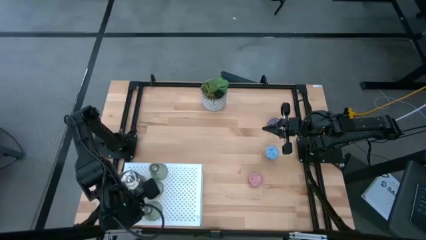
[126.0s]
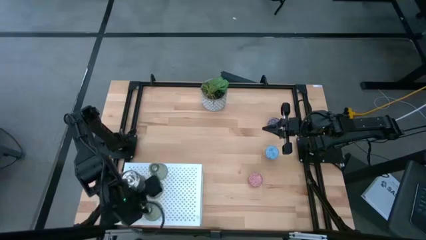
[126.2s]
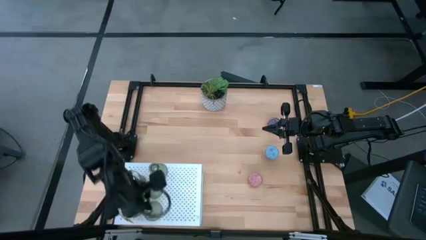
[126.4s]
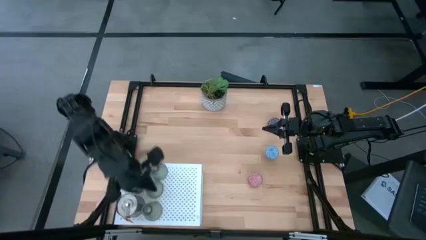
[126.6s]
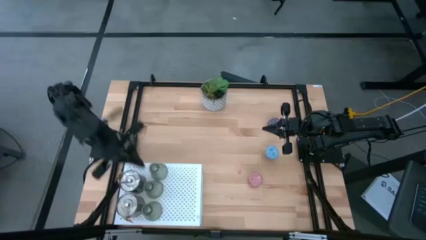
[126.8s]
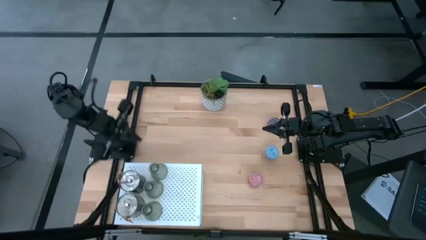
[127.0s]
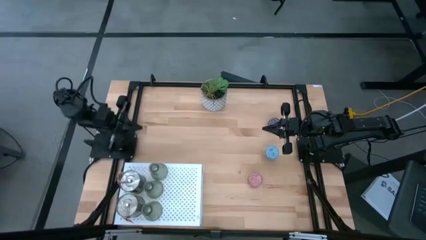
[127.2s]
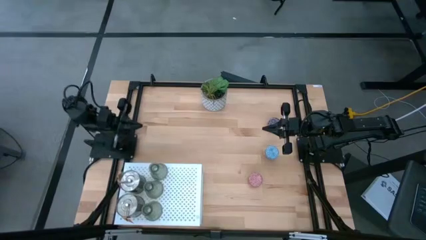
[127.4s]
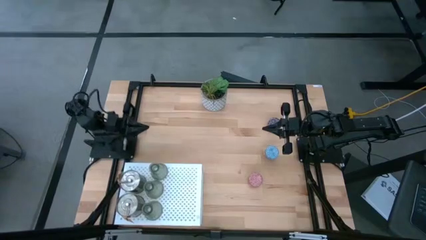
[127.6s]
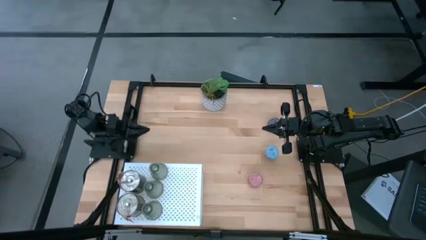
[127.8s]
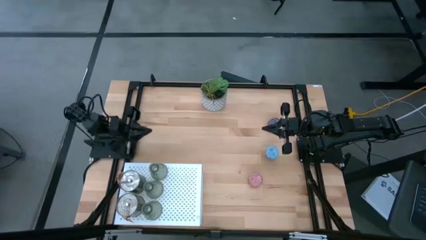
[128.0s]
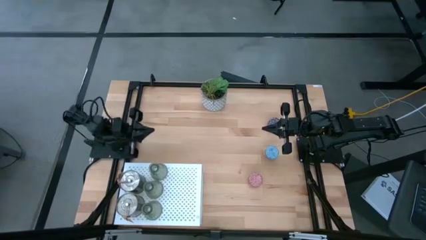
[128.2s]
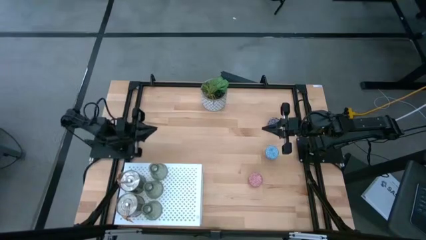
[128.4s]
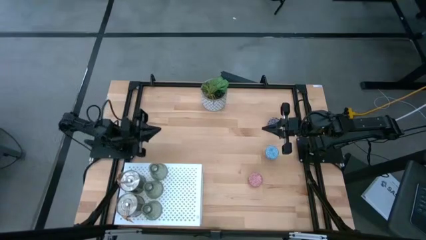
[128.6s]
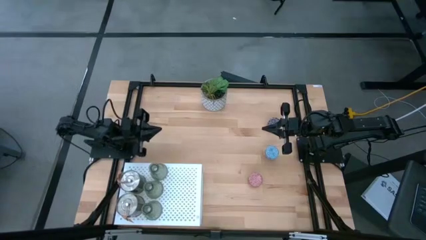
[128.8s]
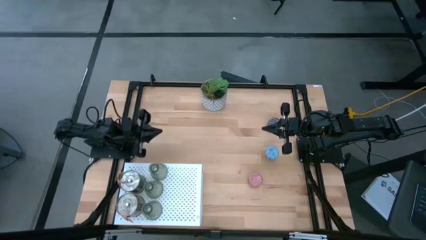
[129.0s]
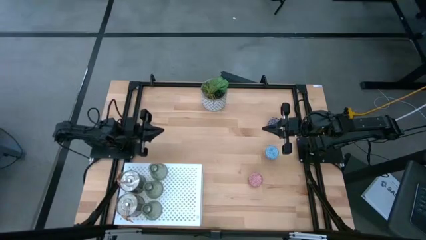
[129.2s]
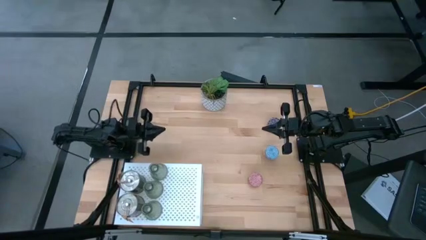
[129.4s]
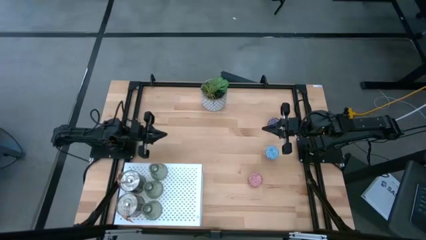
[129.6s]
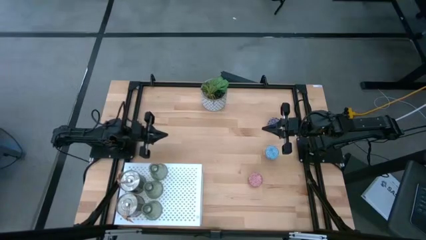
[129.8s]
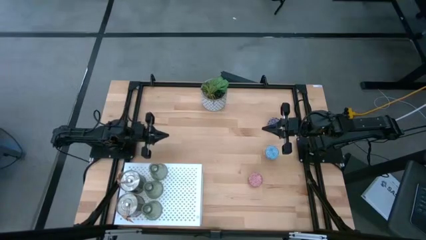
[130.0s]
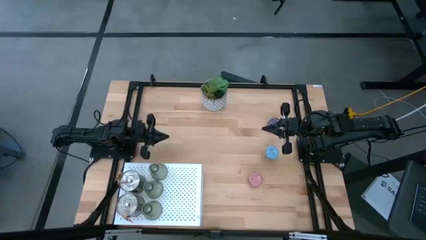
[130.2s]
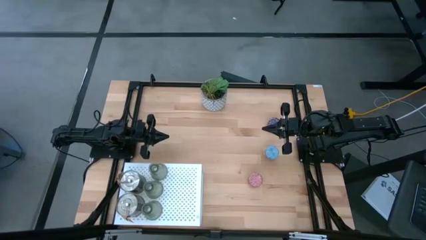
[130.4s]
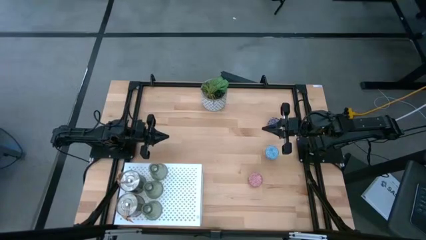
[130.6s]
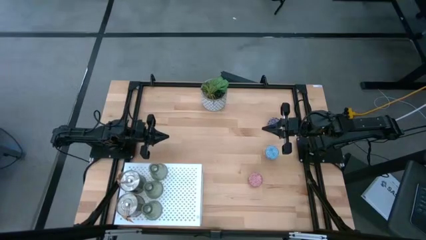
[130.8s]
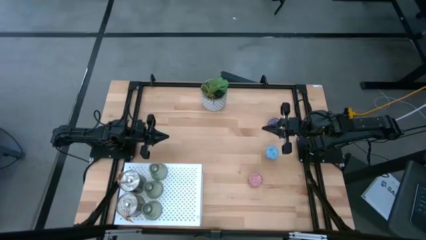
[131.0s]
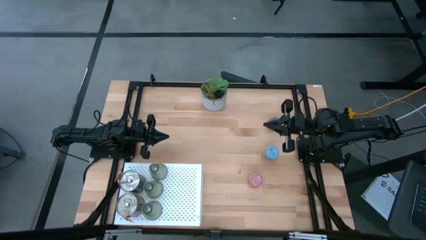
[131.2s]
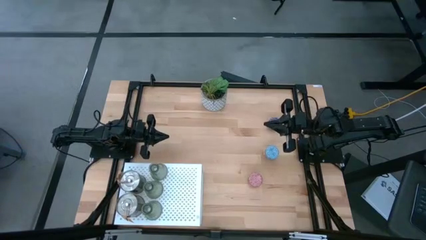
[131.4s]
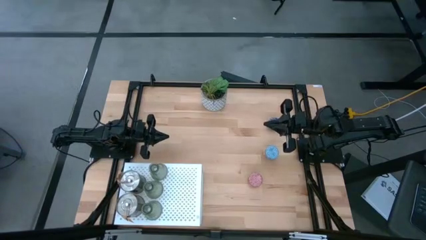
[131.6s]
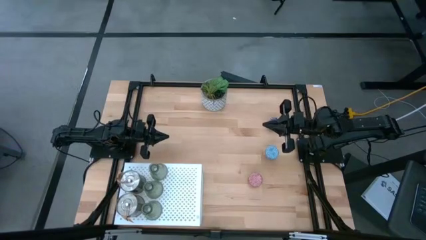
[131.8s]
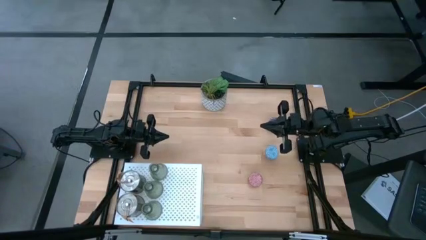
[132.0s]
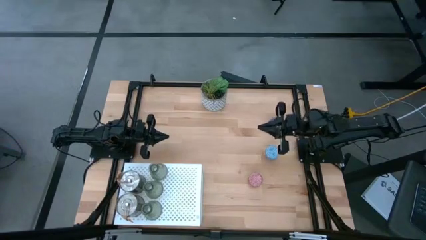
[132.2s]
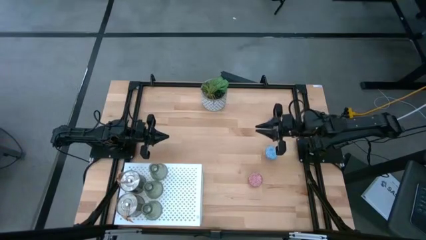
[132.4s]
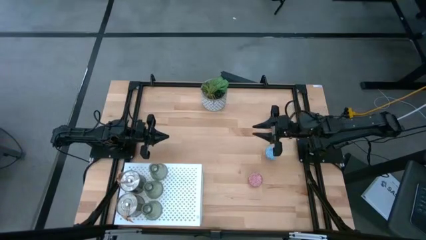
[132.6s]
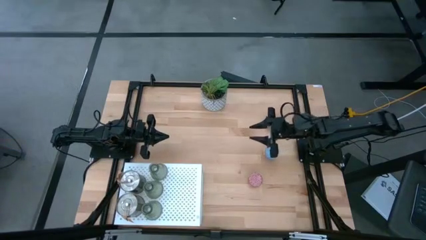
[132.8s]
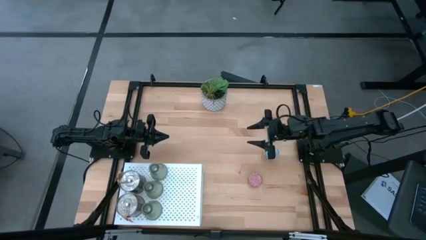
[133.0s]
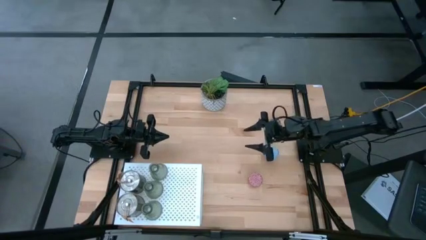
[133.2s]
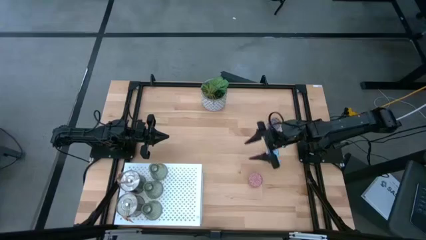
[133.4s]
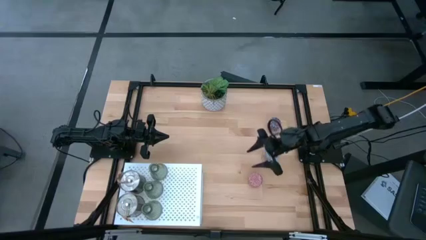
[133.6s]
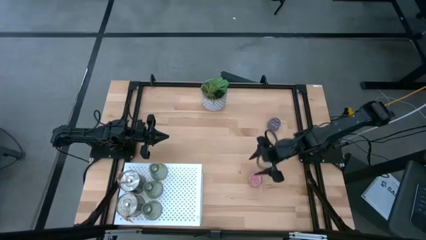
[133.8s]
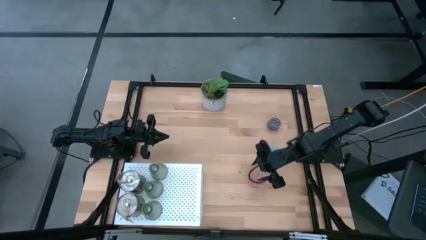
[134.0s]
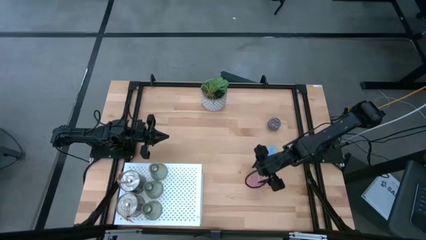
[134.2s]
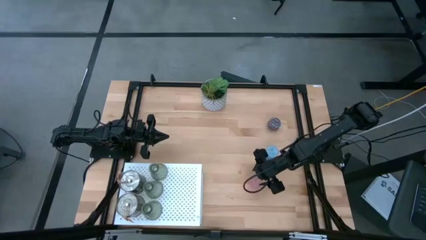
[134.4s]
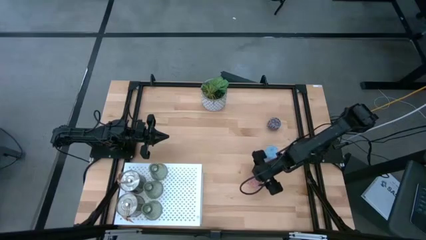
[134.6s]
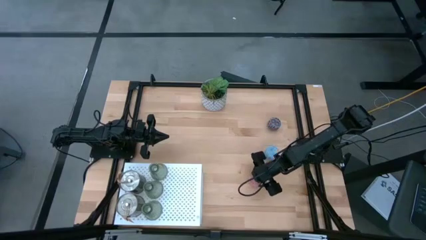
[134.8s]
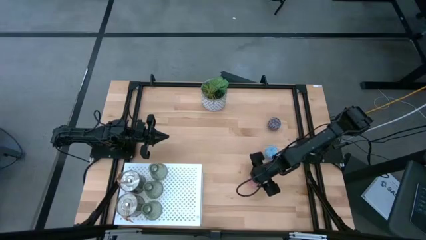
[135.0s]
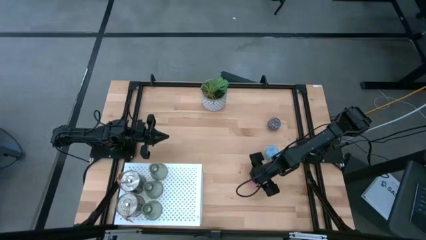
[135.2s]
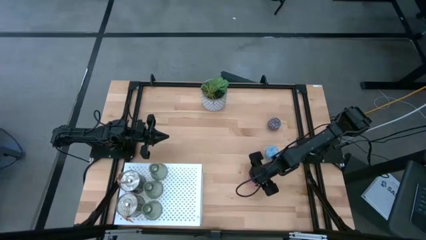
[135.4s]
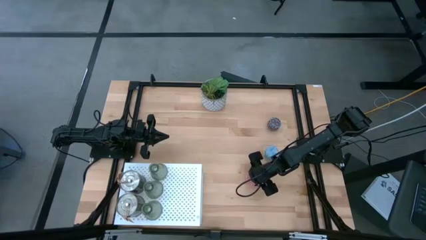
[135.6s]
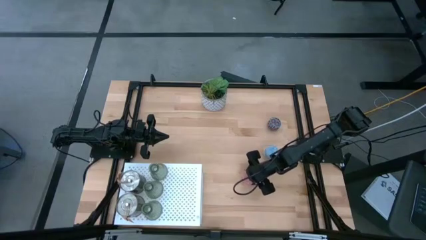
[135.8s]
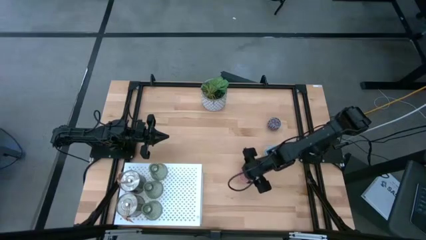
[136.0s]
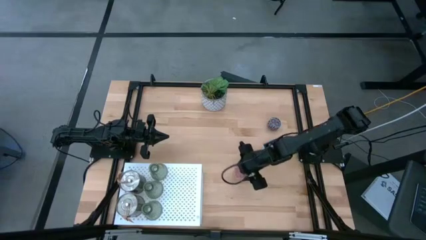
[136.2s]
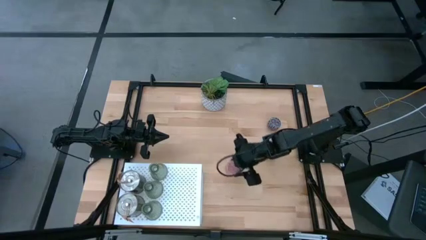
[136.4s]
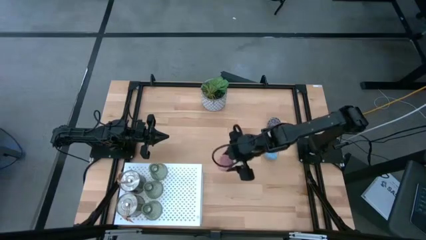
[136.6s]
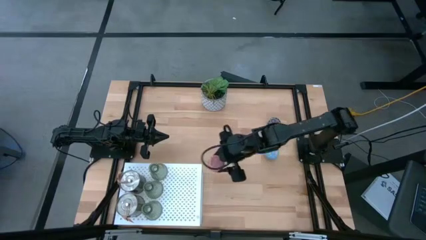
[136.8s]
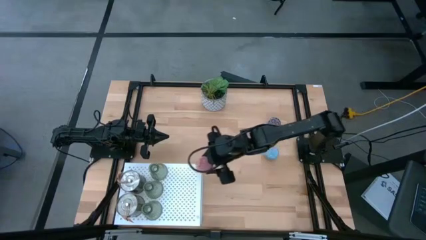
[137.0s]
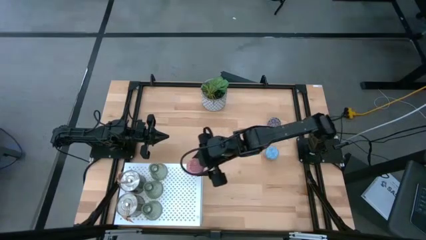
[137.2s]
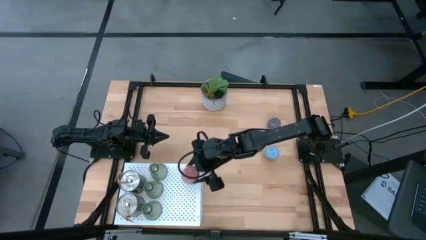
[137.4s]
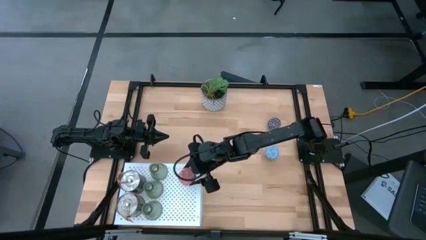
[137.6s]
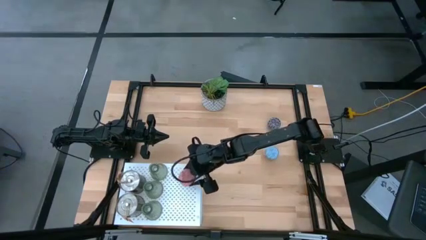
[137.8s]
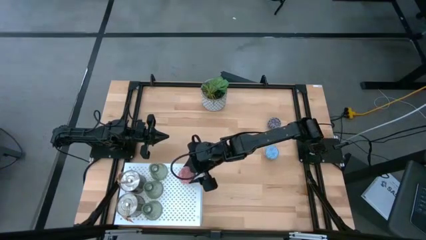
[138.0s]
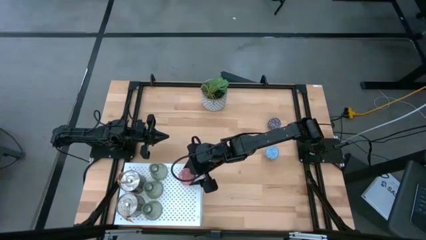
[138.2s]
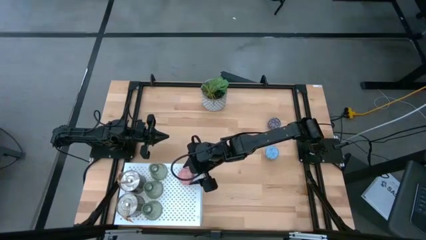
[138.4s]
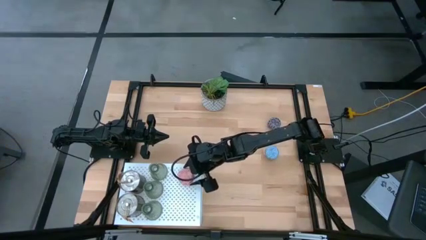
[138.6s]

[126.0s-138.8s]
Task: Pick & Place candle stick holders
Put the pink scented candle on the shelf

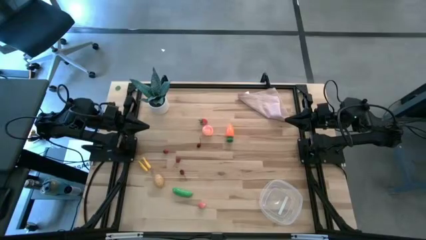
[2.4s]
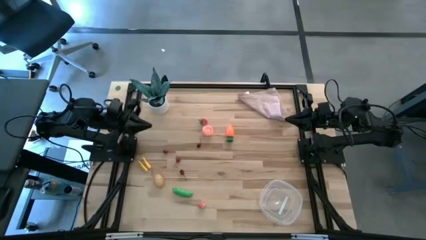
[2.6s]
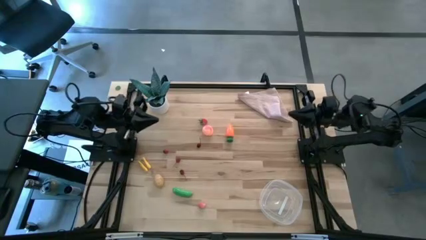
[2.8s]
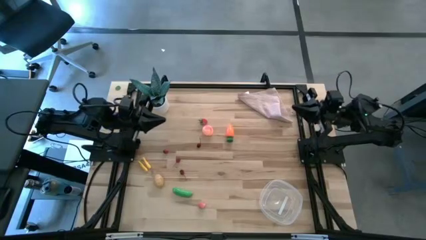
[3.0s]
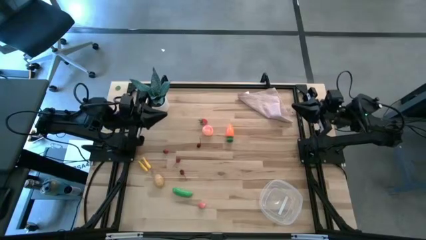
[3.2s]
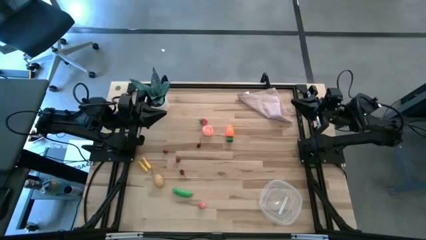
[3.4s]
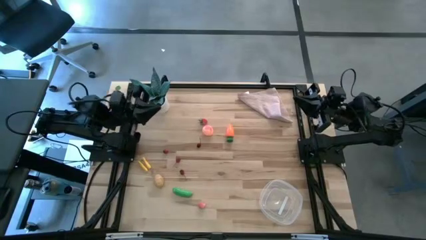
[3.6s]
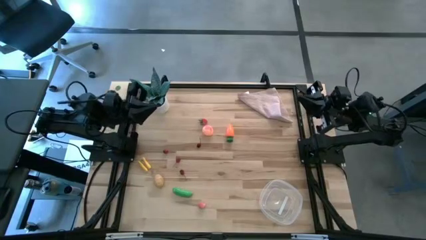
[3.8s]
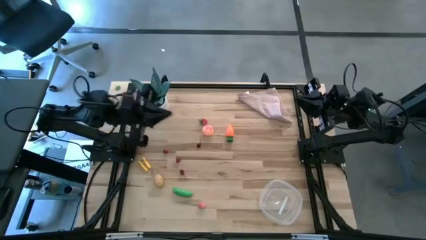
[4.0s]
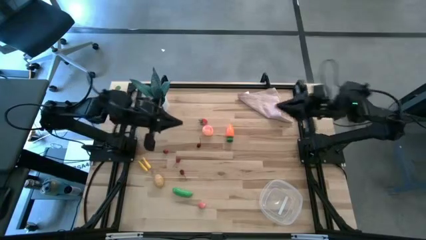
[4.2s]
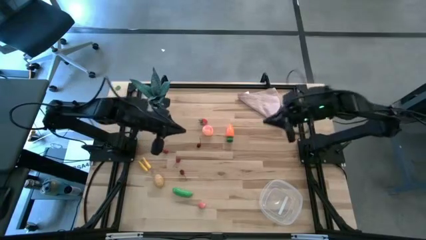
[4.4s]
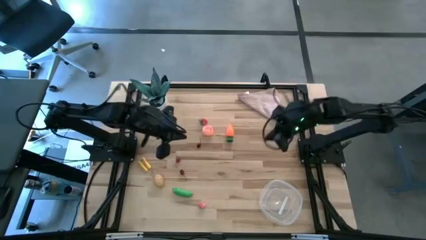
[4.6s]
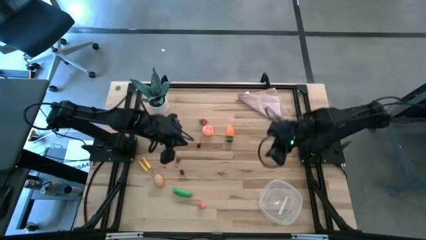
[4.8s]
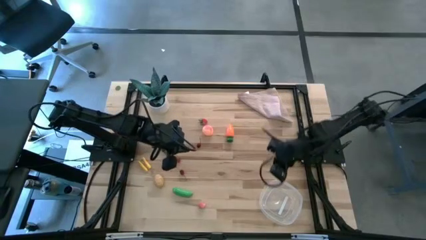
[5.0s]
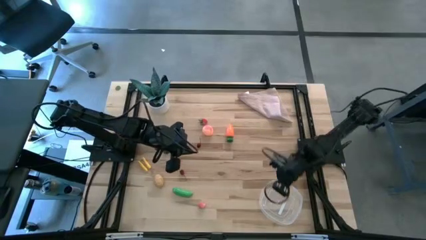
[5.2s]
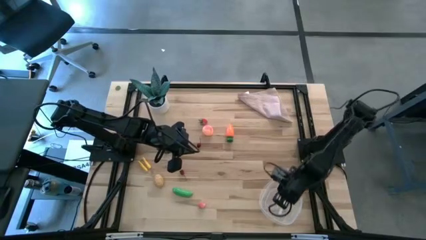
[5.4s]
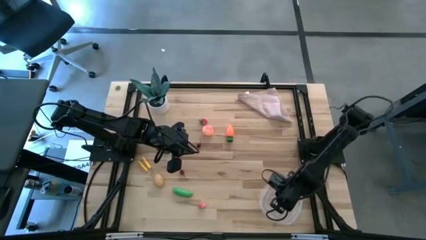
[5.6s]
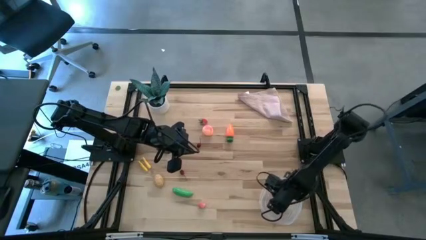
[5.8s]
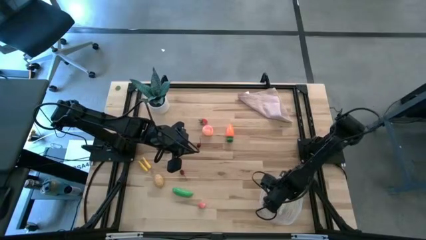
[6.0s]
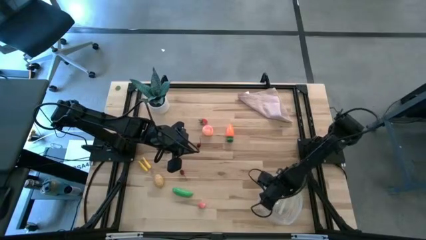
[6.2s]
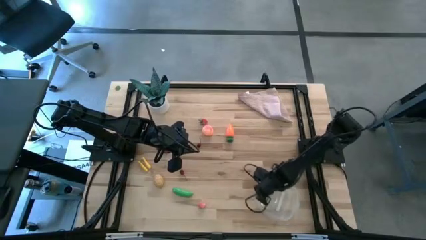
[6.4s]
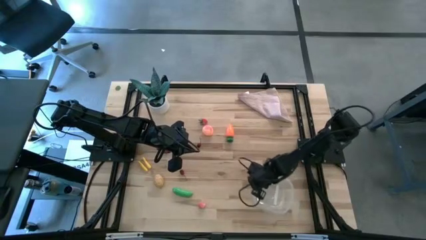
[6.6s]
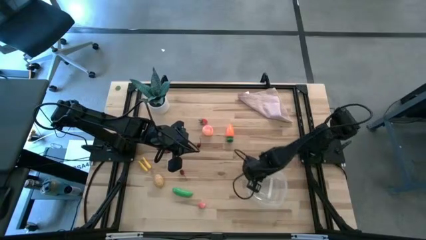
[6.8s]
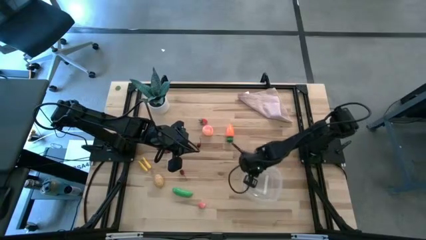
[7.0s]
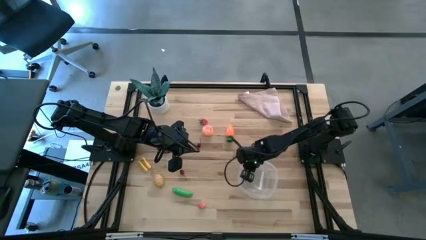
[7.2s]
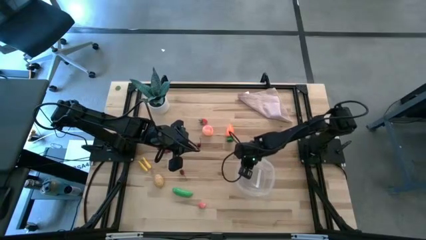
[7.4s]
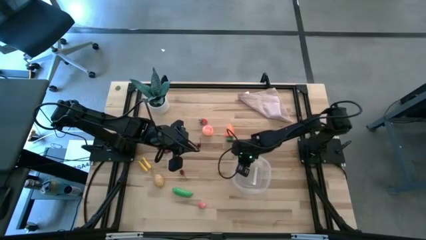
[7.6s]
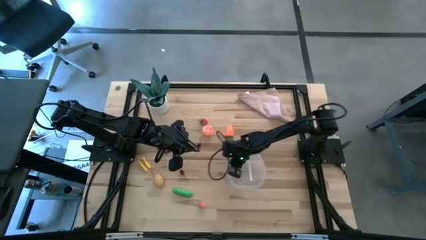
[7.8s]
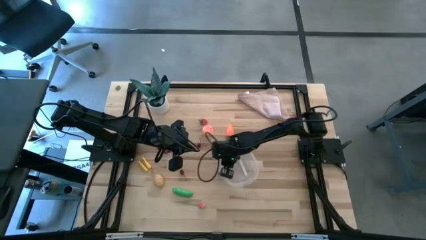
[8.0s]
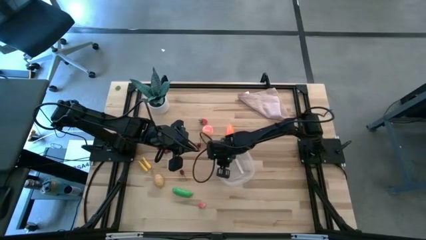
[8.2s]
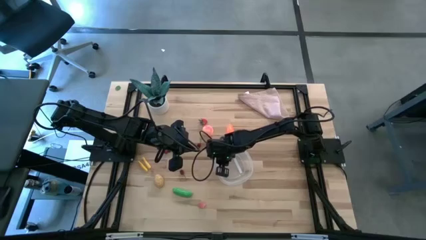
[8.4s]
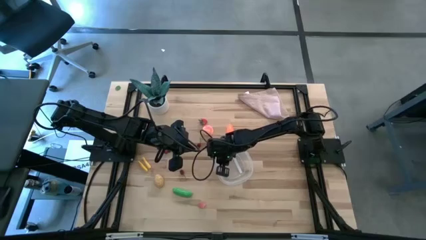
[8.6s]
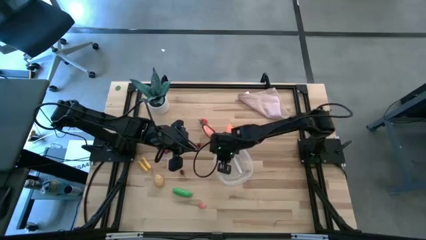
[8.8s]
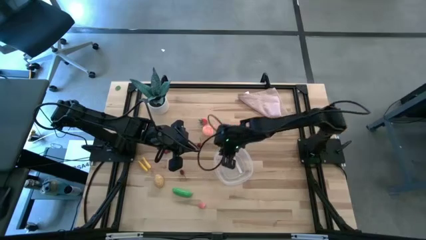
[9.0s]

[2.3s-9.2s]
Task: Pick and placing Produce into tupperware
Prepare the transparent bin
